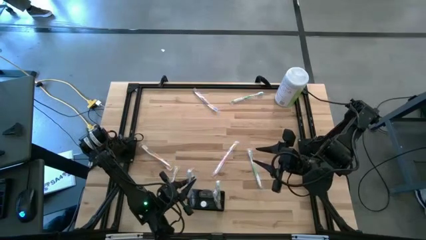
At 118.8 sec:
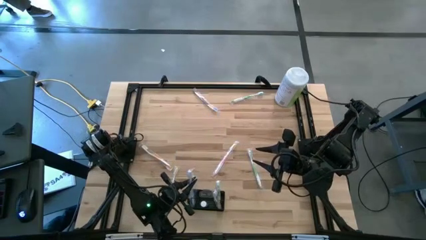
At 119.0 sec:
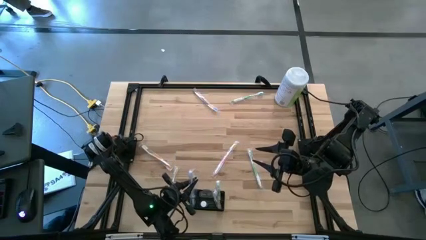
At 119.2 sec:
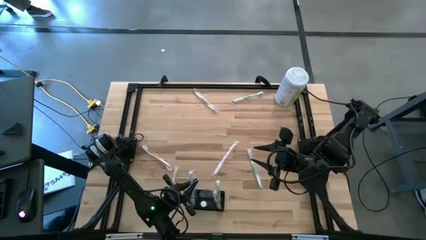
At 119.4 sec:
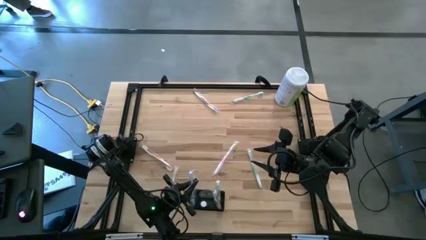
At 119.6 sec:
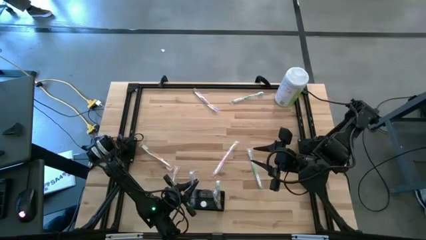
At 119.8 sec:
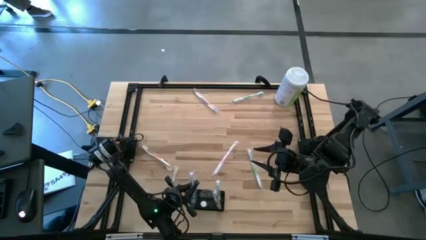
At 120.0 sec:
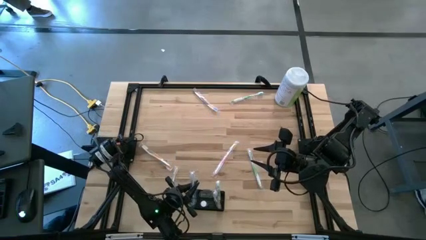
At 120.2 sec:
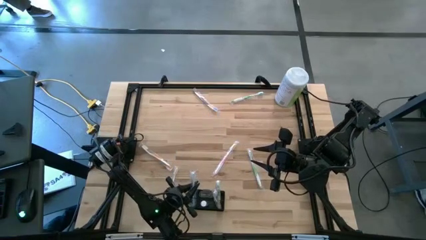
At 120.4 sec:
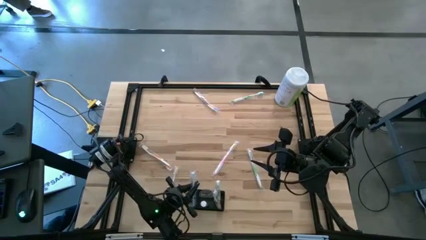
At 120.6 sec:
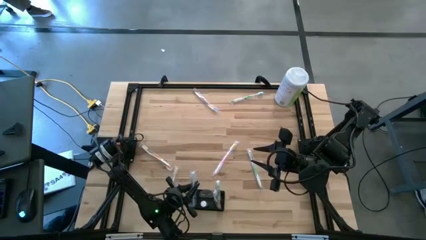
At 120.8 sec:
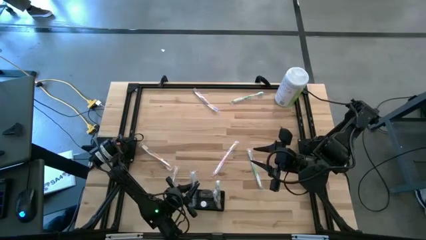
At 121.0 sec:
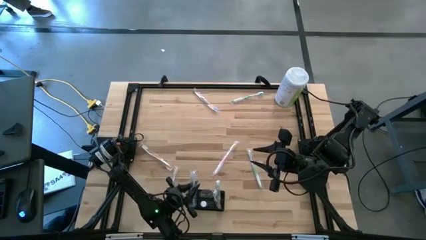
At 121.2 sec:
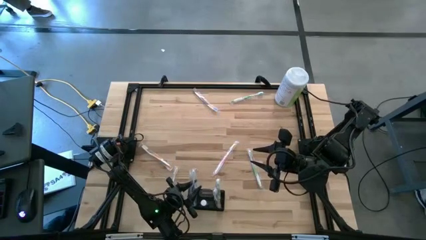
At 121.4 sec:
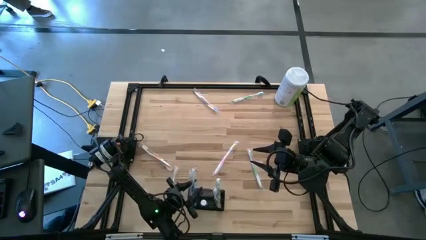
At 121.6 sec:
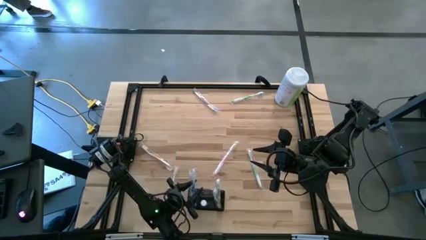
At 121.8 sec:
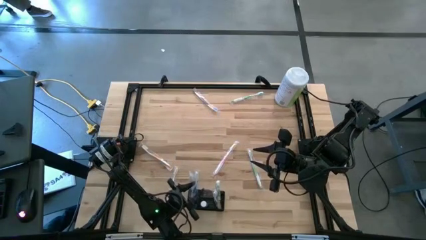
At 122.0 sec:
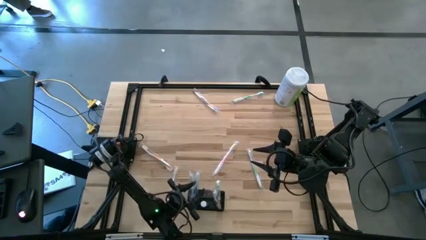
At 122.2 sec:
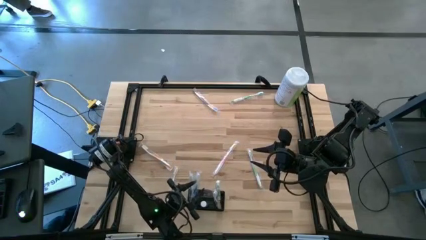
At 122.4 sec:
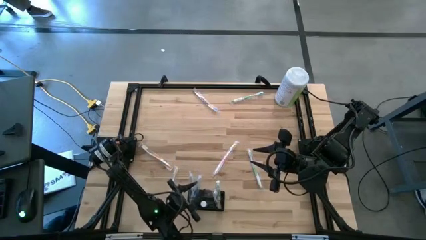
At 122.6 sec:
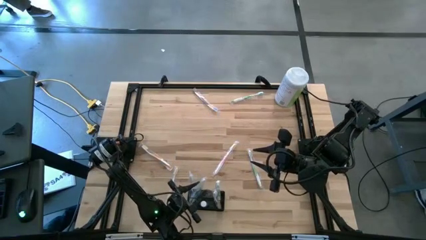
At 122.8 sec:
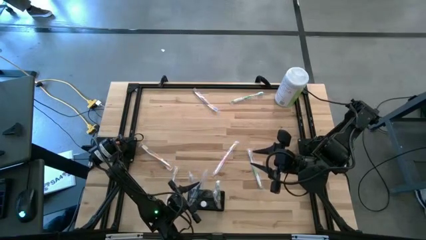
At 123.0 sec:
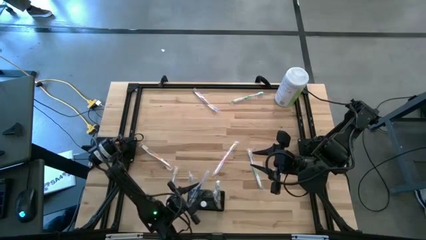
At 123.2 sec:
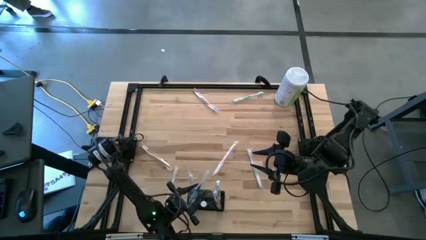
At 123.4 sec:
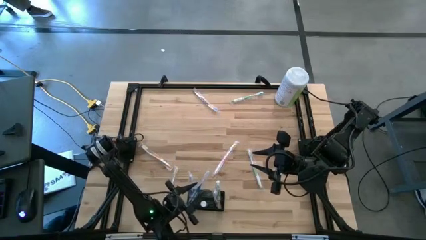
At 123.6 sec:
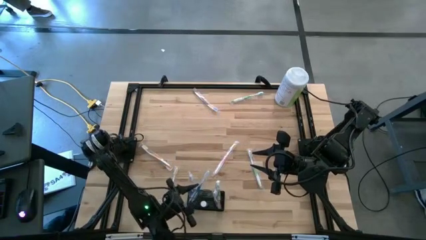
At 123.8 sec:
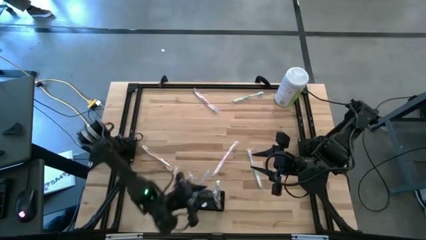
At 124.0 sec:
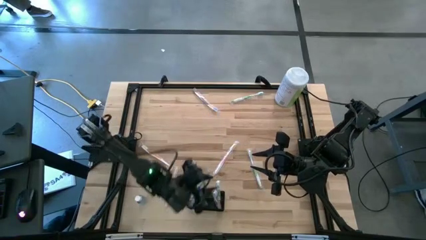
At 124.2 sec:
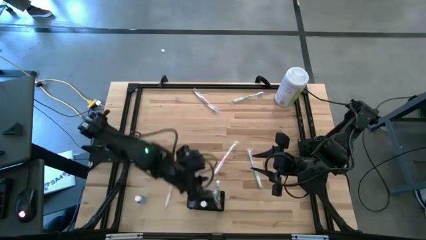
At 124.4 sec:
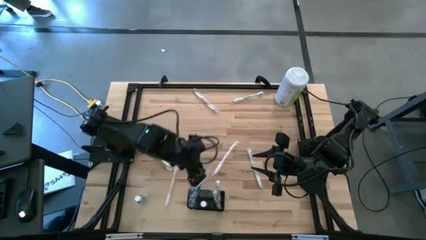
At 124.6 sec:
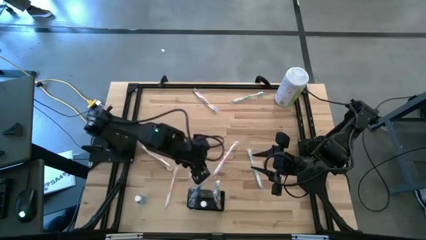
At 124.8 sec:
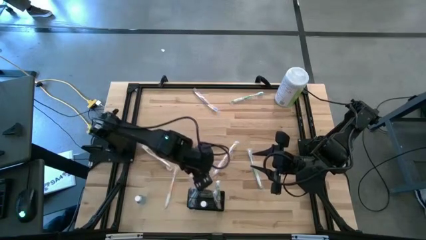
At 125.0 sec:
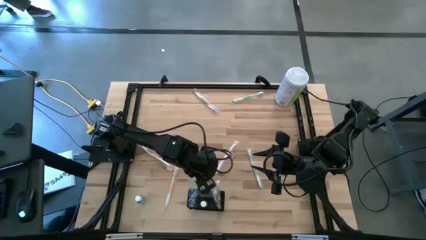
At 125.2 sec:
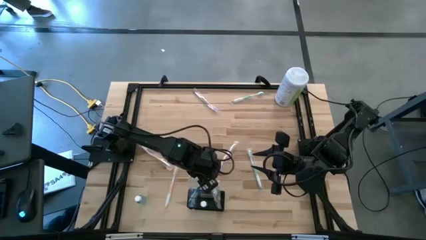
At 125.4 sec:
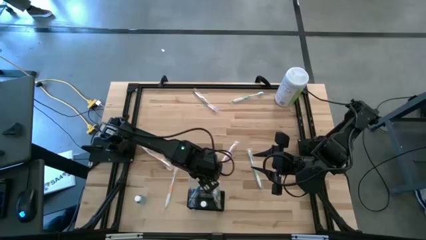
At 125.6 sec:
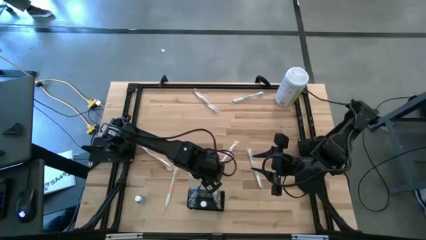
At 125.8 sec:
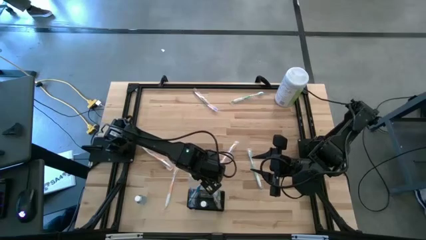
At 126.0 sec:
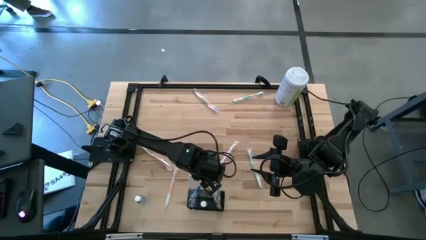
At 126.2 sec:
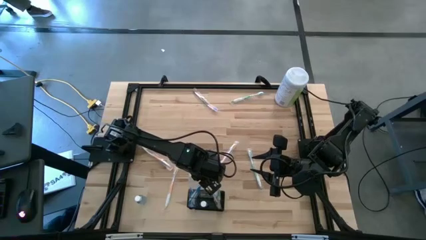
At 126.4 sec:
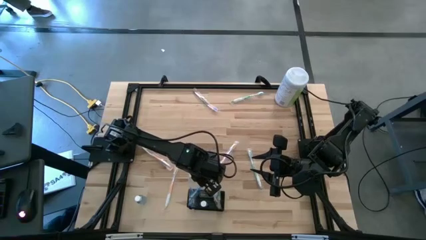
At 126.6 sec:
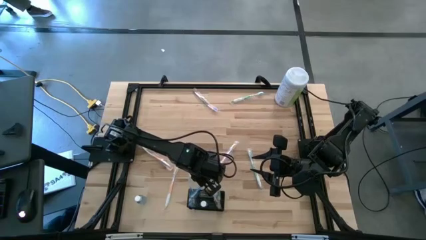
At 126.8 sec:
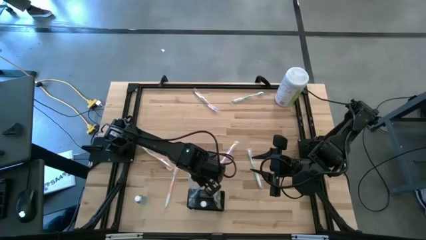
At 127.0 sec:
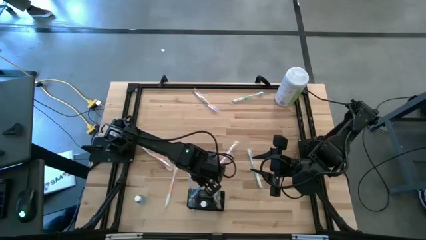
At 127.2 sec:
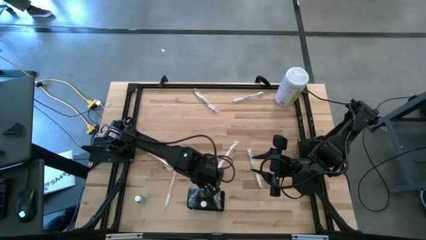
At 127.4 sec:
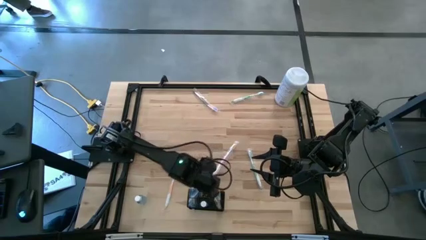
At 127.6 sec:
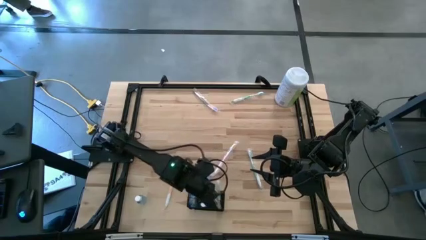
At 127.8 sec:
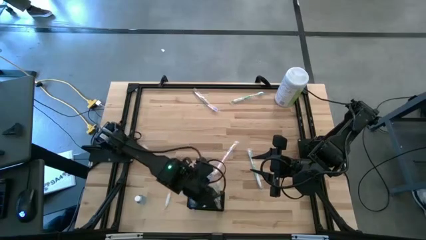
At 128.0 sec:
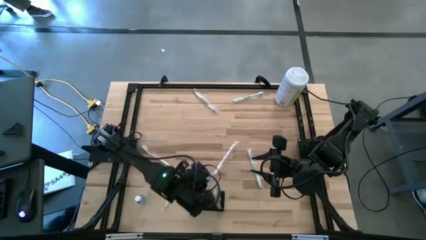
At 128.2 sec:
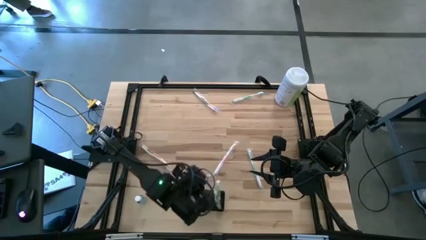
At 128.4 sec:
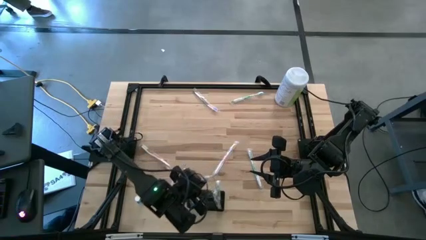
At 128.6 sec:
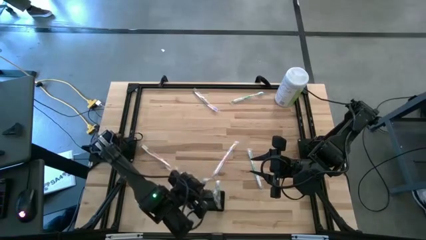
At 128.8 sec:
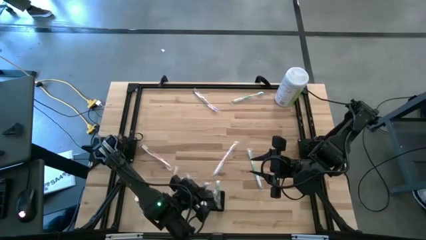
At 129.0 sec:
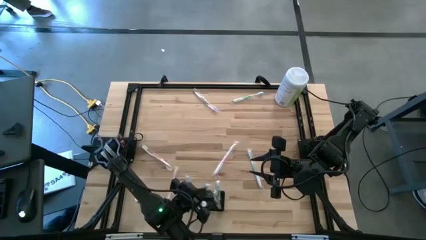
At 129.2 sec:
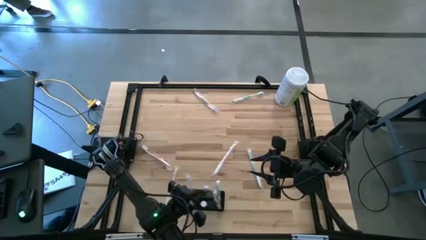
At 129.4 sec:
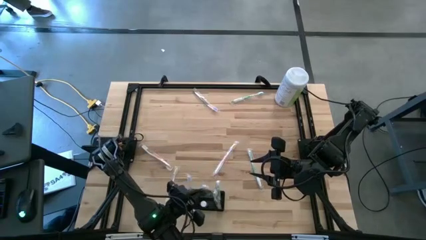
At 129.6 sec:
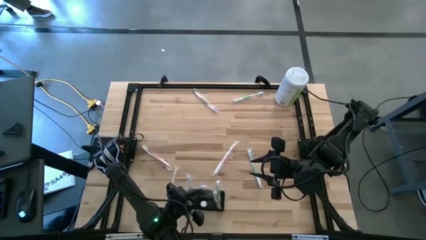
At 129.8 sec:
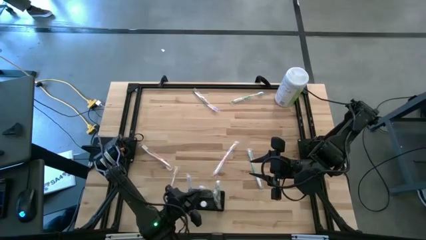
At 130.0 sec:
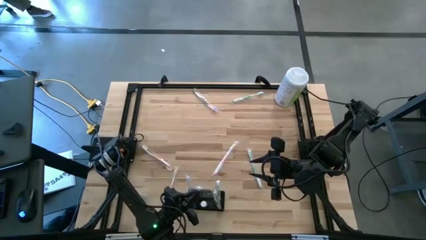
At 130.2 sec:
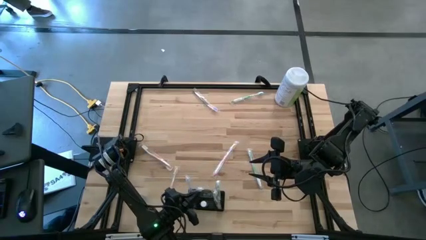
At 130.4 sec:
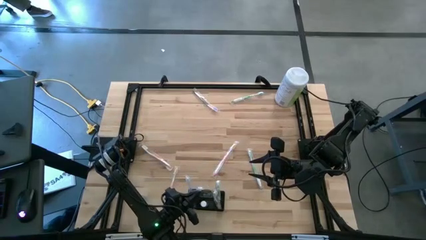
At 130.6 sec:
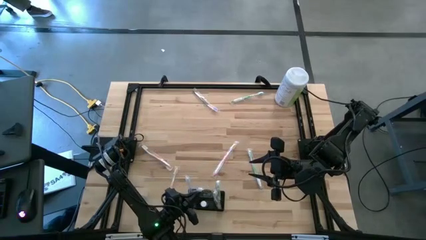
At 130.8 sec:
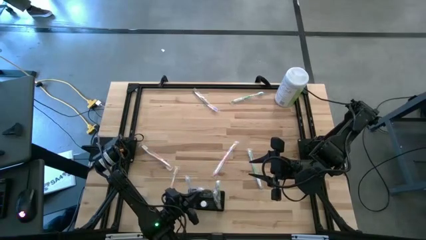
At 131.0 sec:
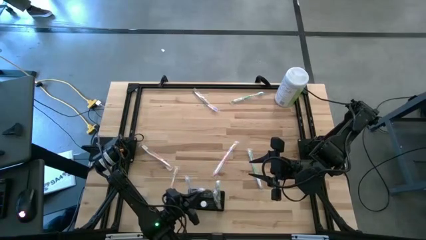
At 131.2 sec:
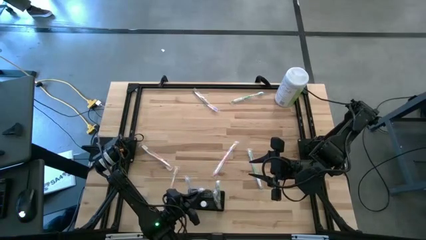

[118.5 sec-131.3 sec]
Task: Pick & Place toothbrushing station
Put the blue toothbrush into the black wire organizer

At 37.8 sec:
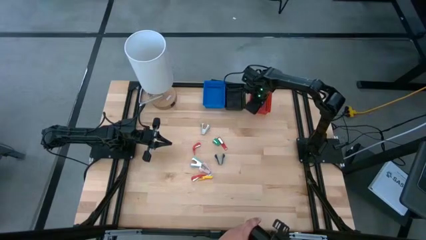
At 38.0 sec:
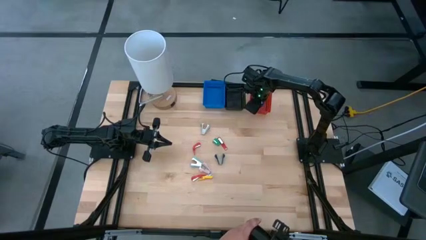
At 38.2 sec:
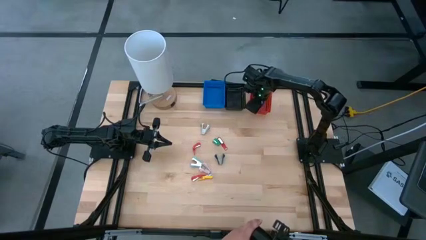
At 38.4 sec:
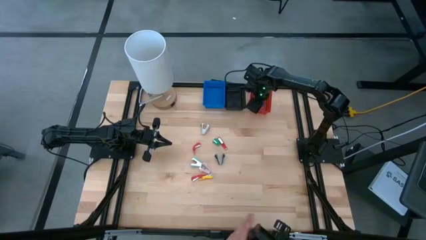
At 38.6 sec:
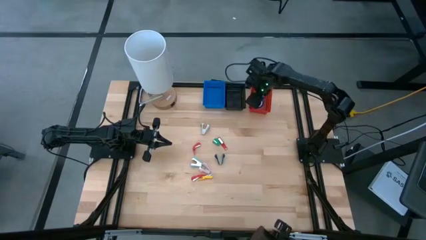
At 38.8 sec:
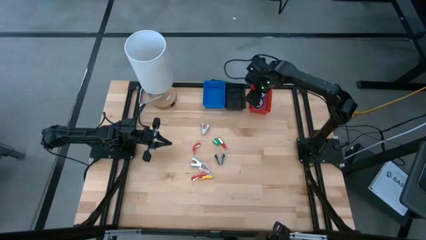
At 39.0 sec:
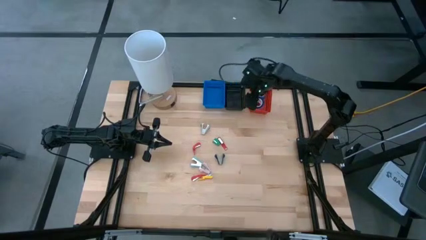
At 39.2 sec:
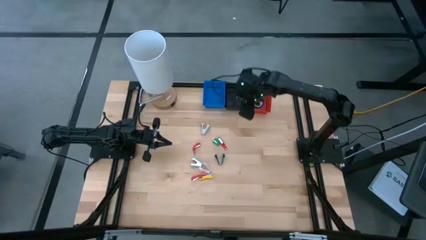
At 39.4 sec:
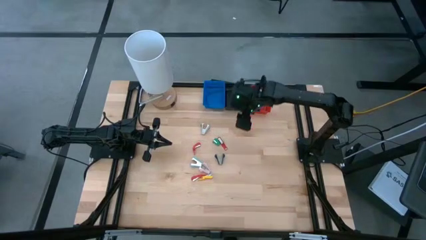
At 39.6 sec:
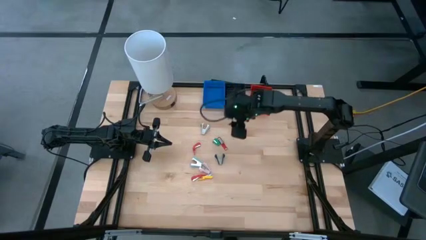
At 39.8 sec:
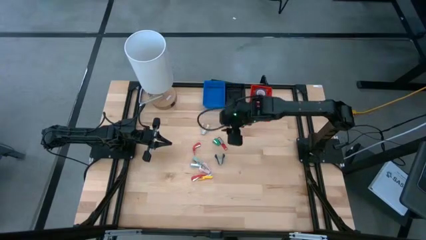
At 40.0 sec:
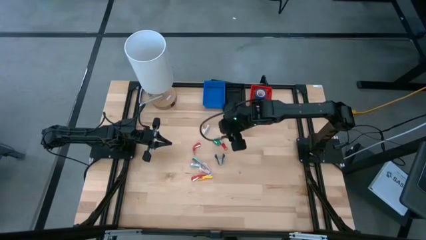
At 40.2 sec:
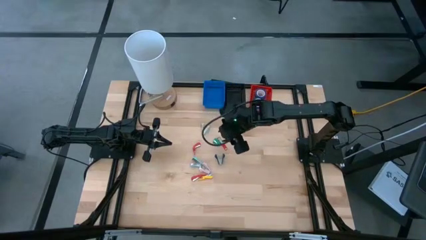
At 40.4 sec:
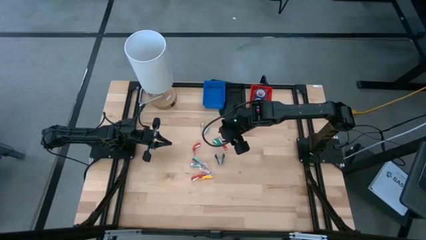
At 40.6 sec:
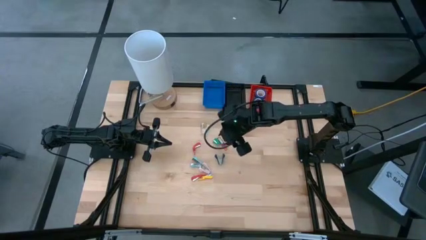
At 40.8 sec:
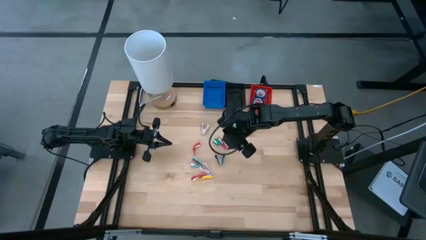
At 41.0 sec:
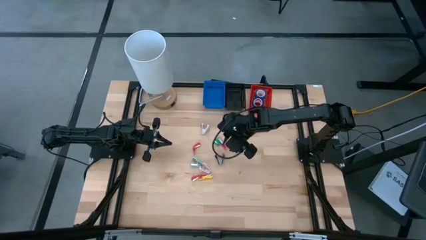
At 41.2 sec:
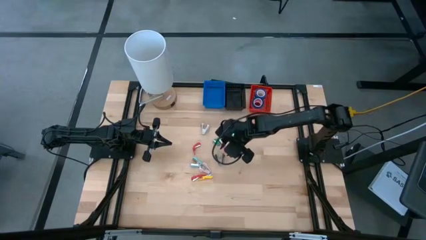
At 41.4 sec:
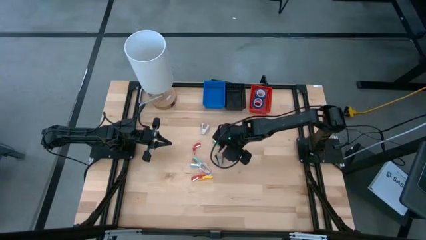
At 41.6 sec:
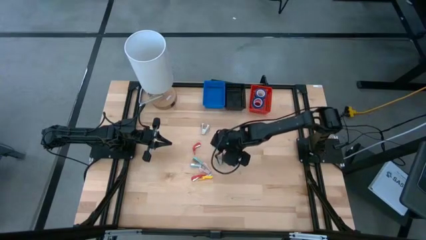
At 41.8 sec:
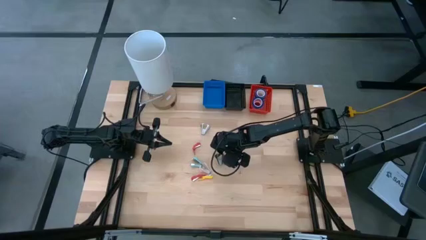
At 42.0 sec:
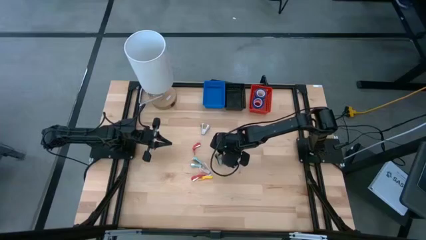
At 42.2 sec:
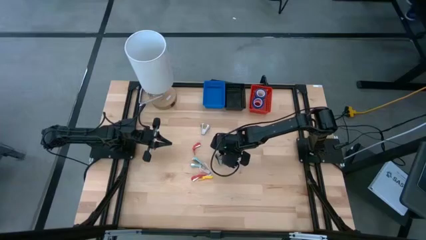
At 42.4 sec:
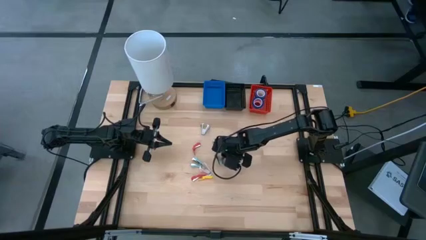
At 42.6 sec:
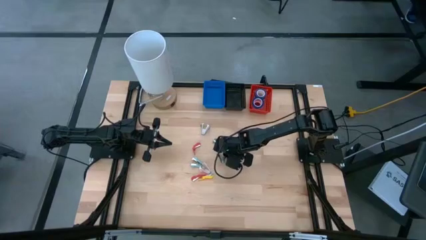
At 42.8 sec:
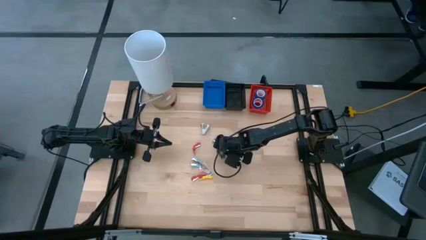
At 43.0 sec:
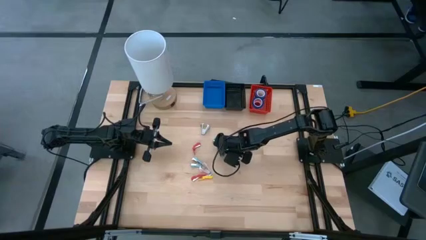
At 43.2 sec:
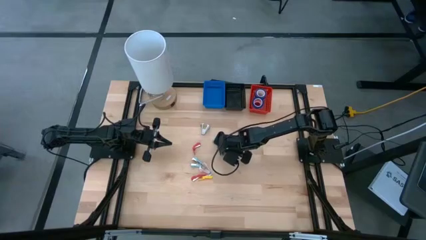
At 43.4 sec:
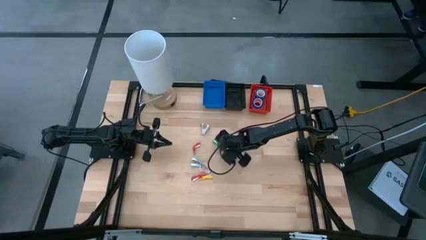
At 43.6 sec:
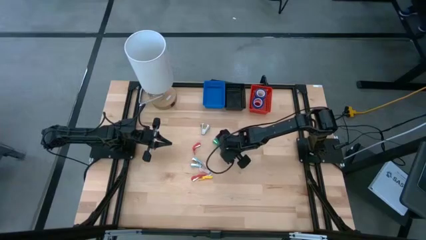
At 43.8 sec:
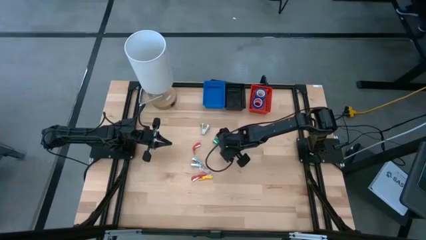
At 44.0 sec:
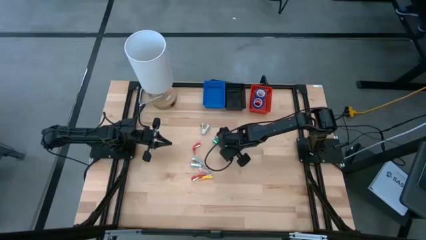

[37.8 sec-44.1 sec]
Task: Pick and place Stapler, Stapler remover, tape
Put the black staple remover into the black bin
